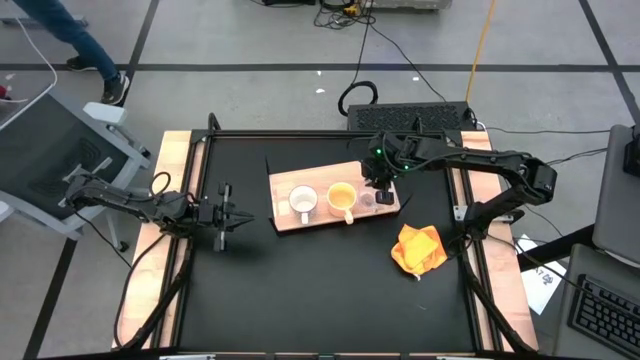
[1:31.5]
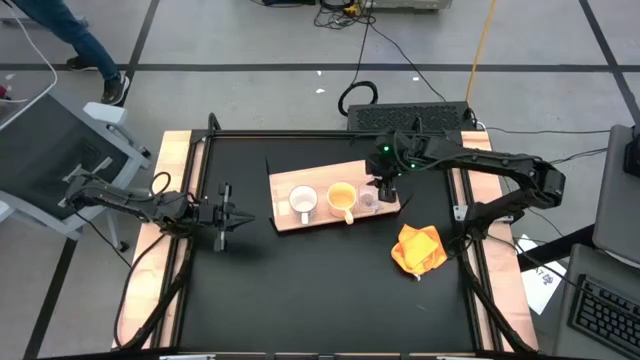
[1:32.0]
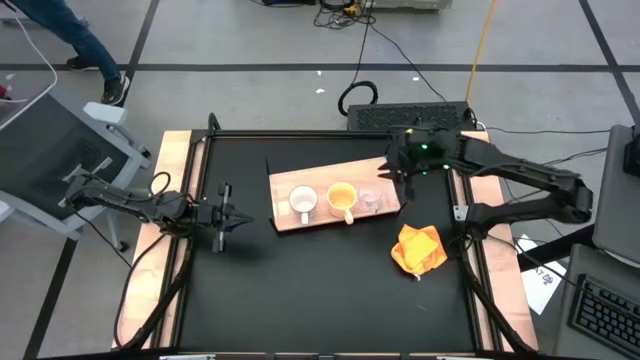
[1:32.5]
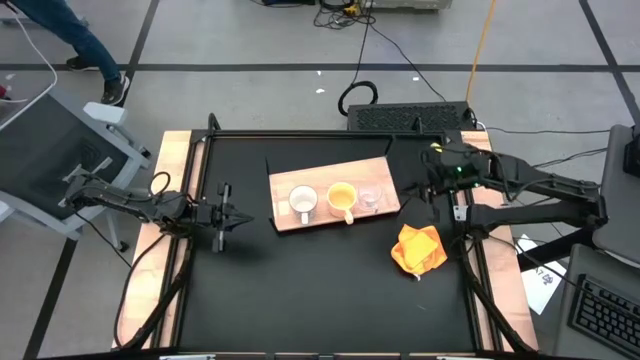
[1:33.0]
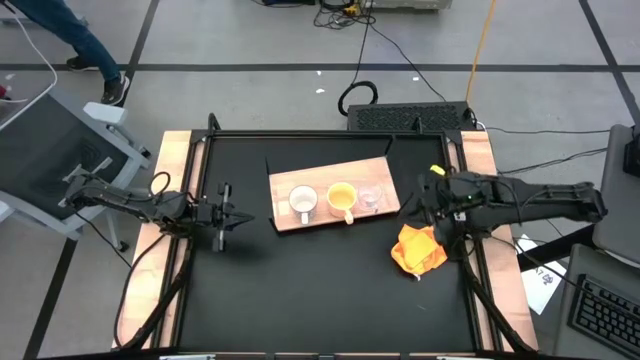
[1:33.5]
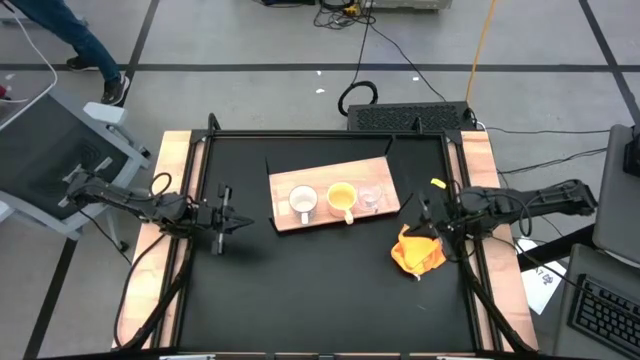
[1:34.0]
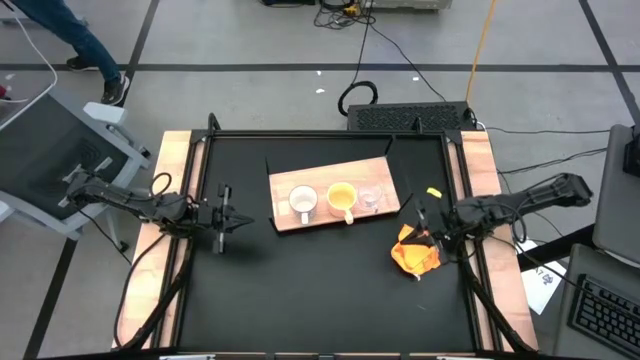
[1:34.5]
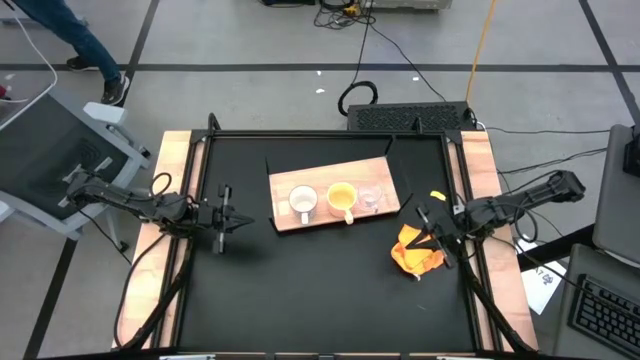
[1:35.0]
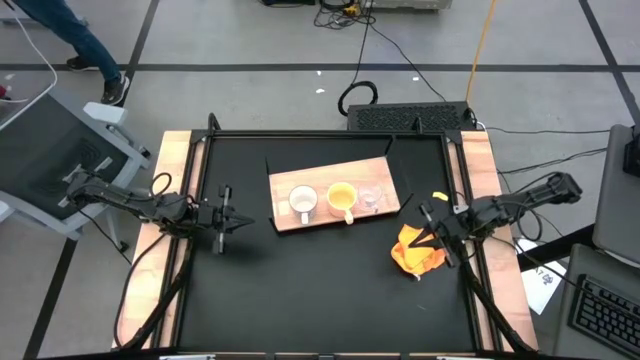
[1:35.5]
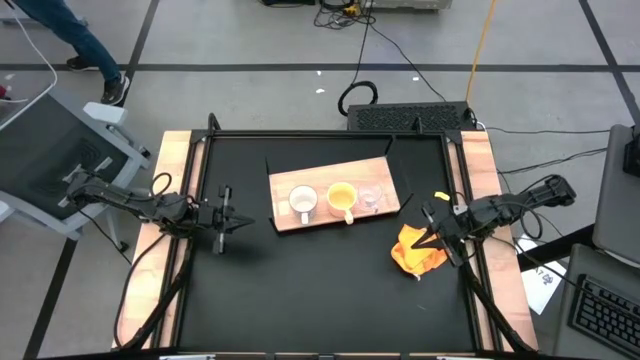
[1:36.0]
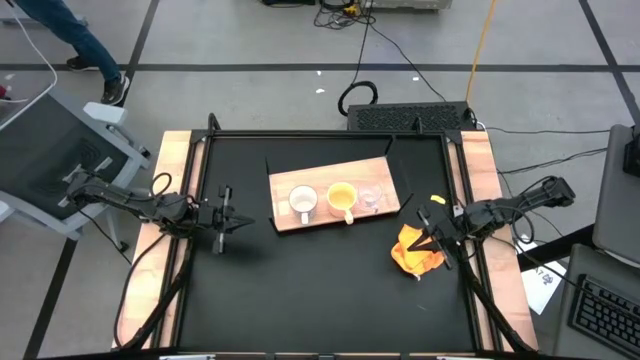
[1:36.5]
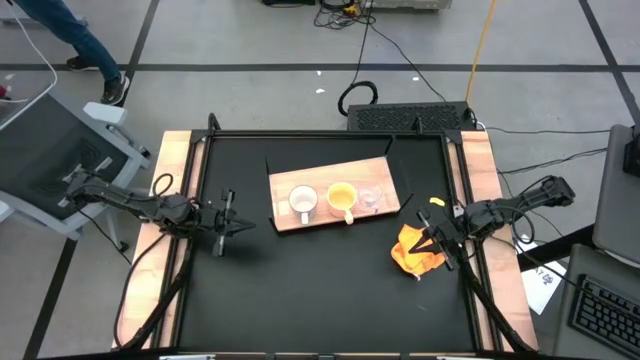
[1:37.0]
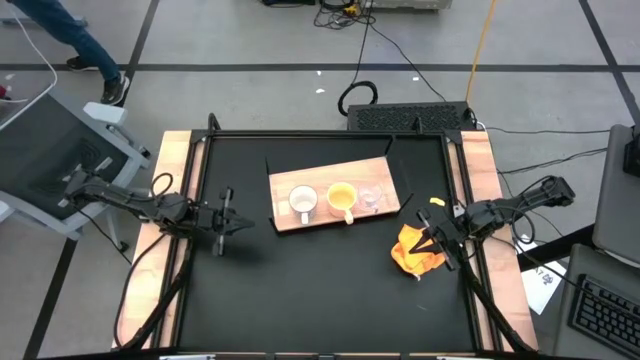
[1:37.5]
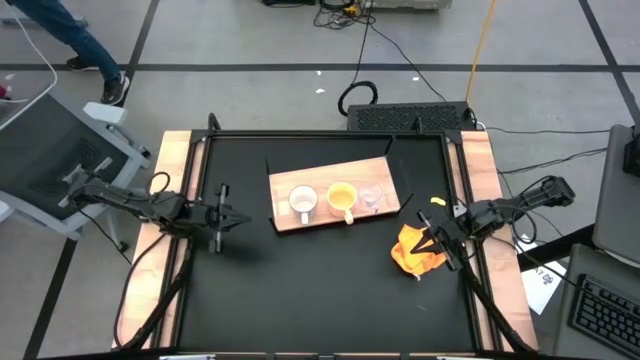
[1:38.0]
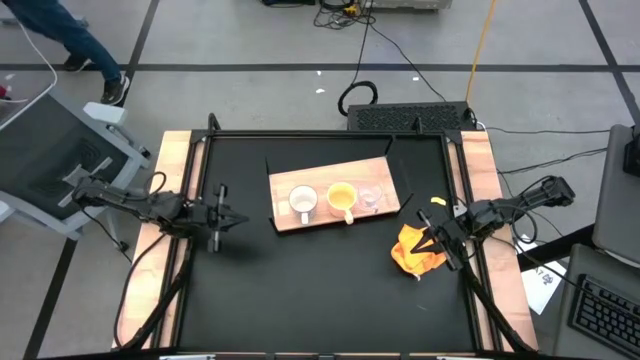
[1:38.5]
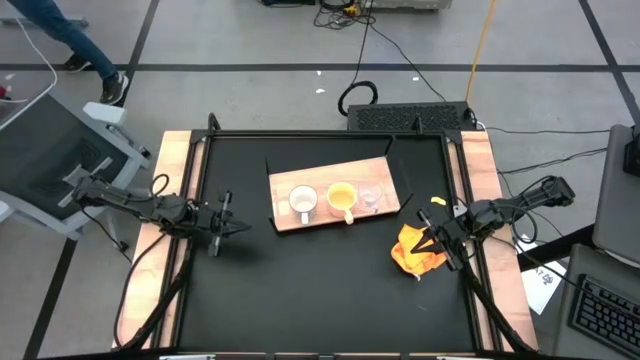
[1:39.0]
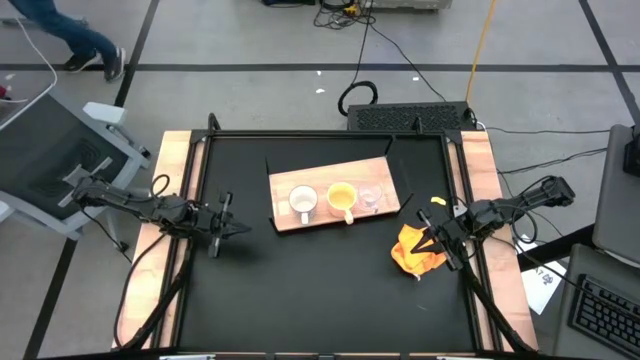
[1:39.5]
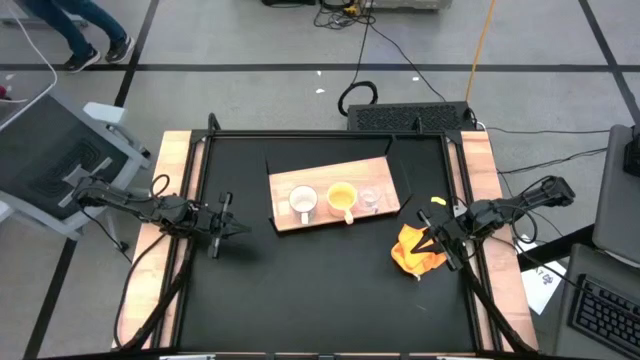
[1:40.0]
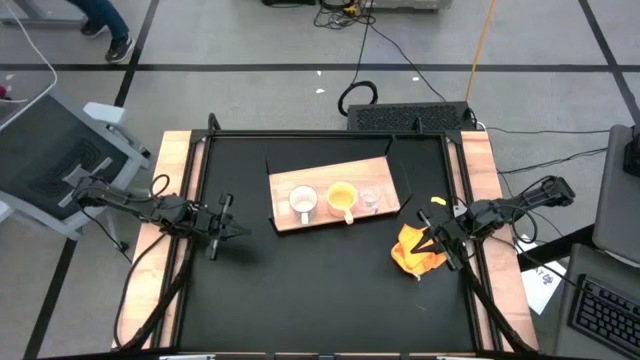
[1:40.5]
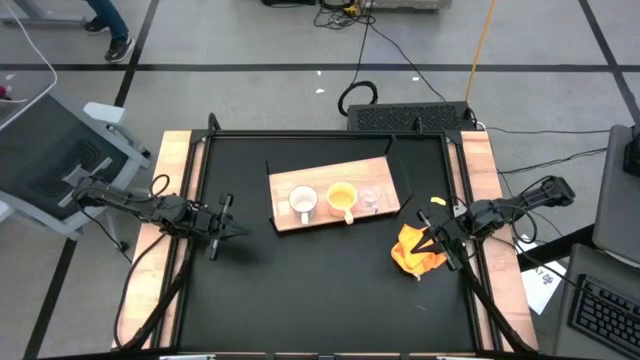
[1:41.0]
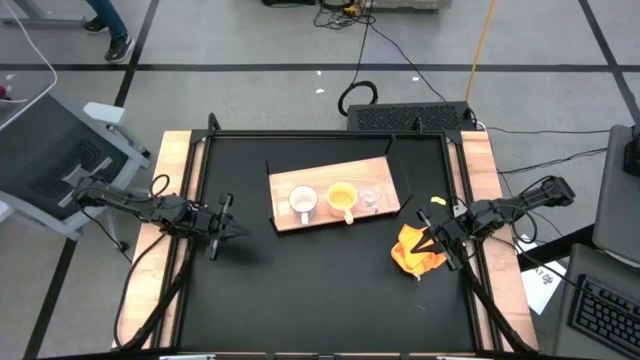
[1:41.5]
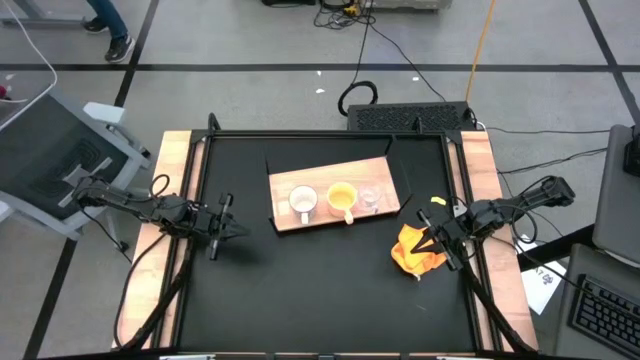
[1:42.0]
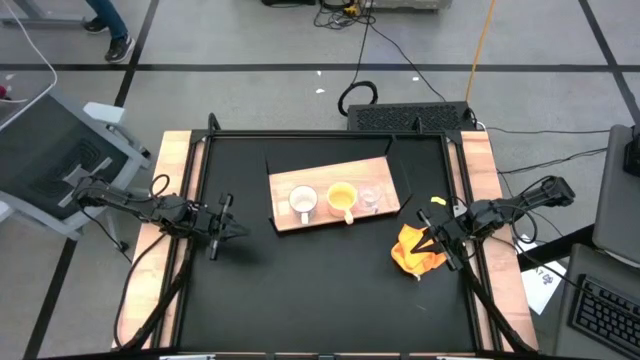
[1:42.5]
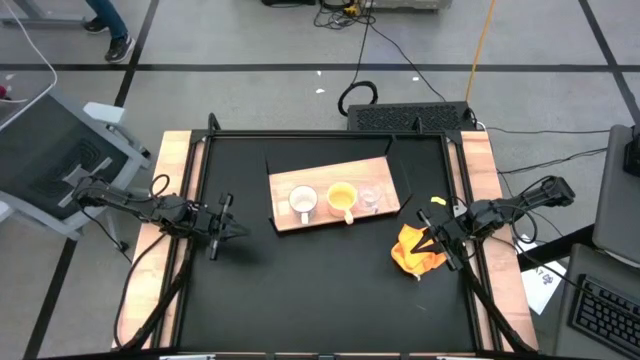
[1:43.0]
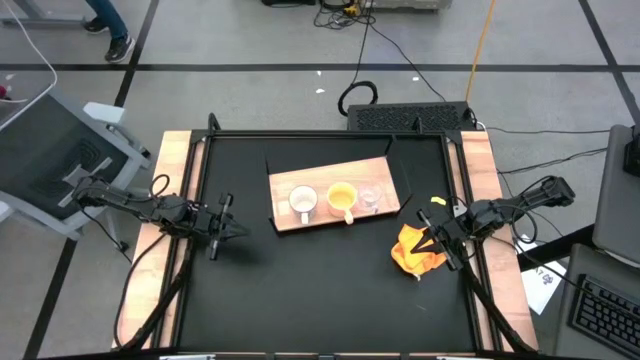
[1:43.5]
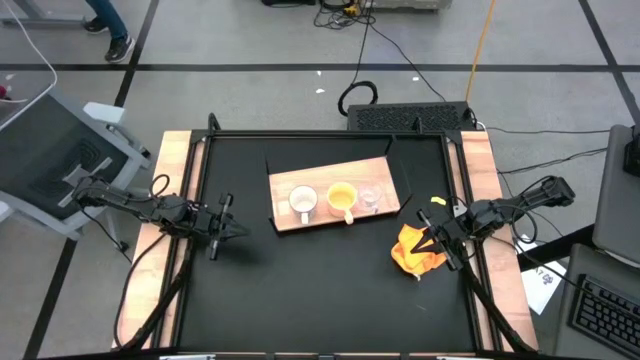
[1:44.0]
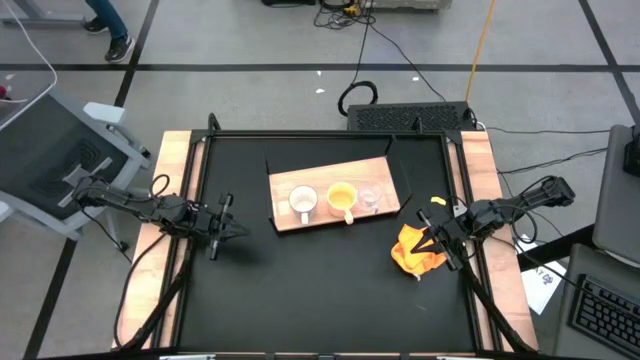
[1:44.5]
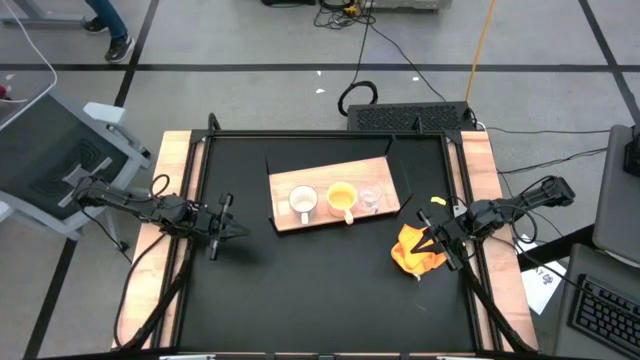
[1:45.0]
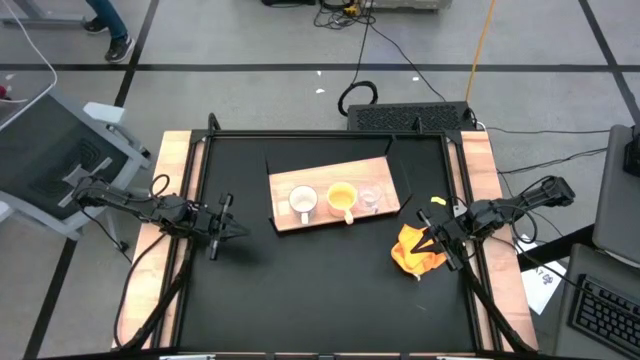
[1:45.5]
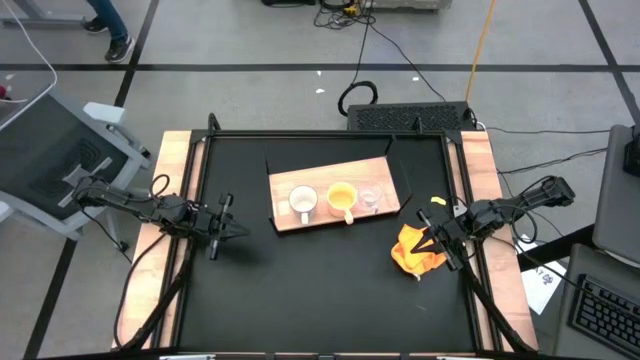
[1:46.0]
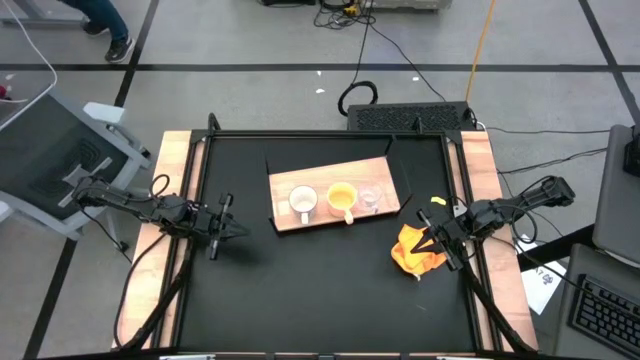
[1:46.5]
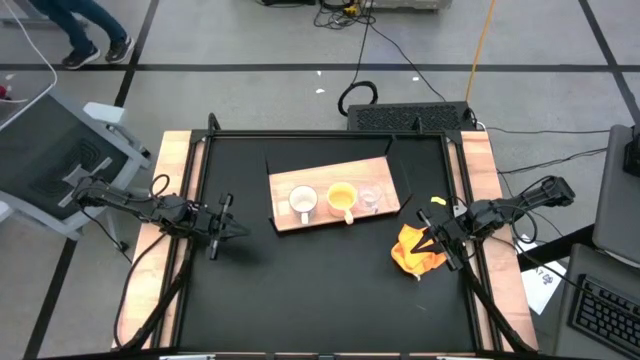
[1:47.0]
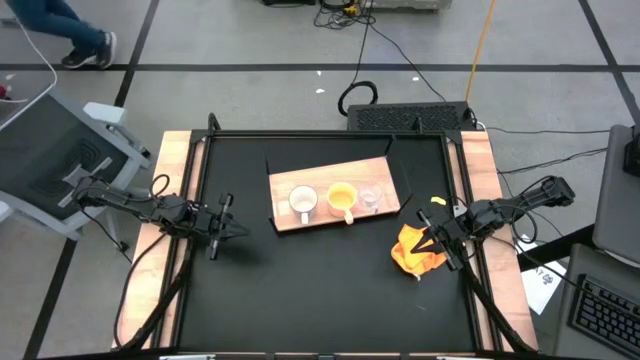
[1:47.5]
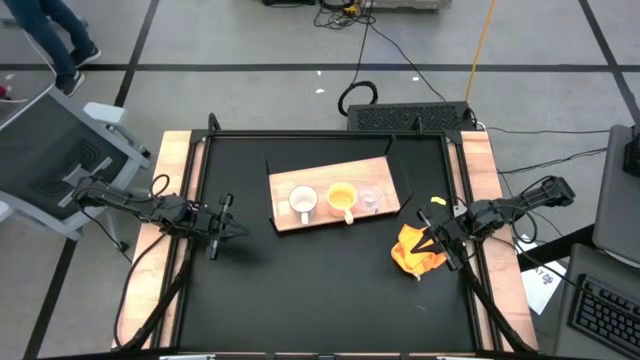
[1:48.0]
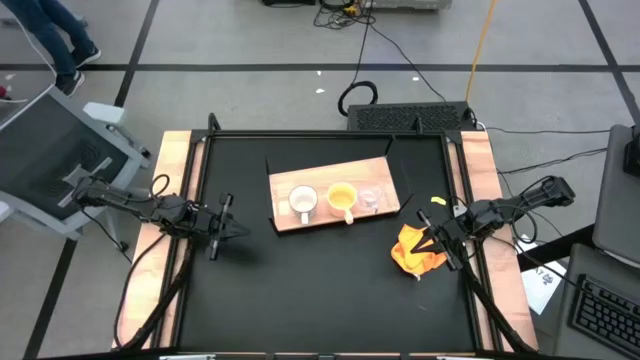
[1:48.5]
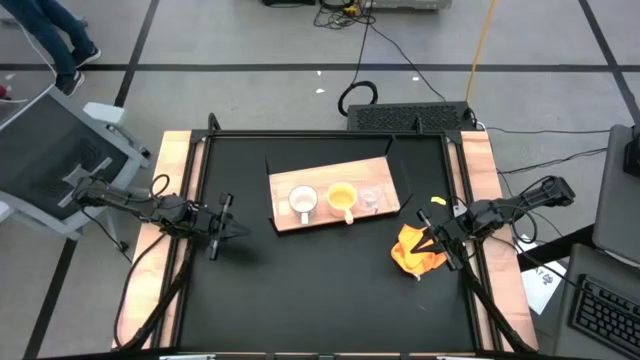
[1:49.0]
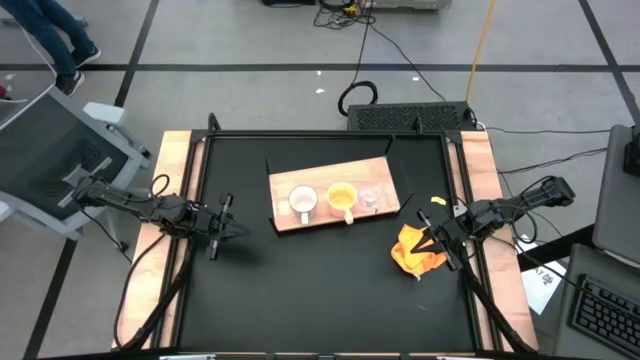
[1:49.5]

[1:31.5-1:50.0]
Task: Stack small to large cups/mugs on shelf
Return to Home Position

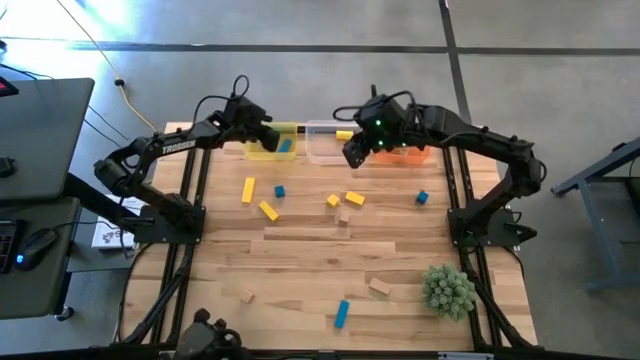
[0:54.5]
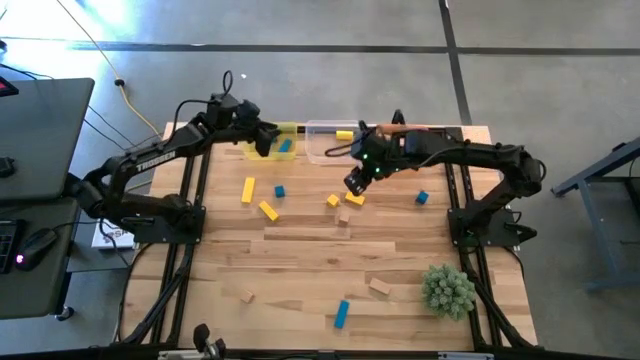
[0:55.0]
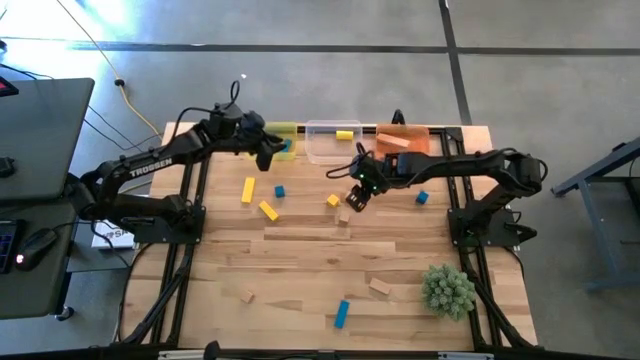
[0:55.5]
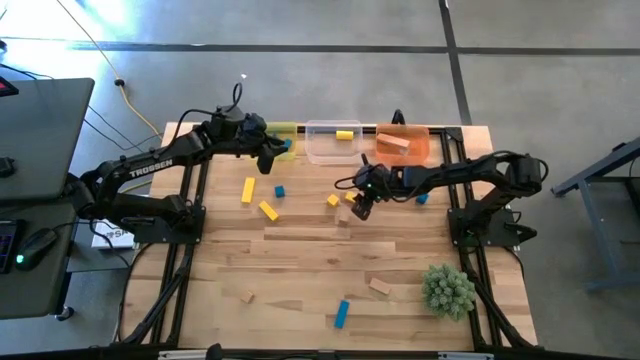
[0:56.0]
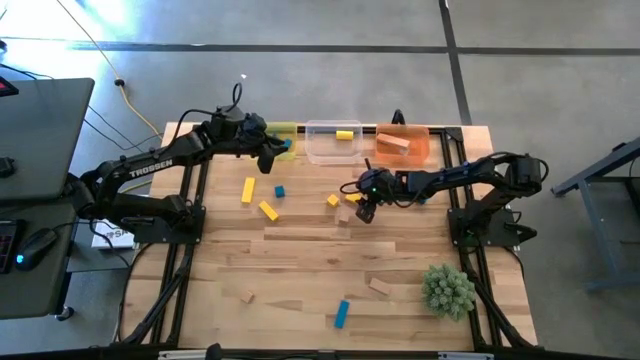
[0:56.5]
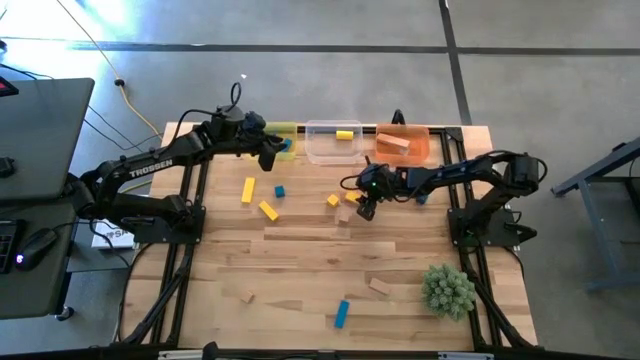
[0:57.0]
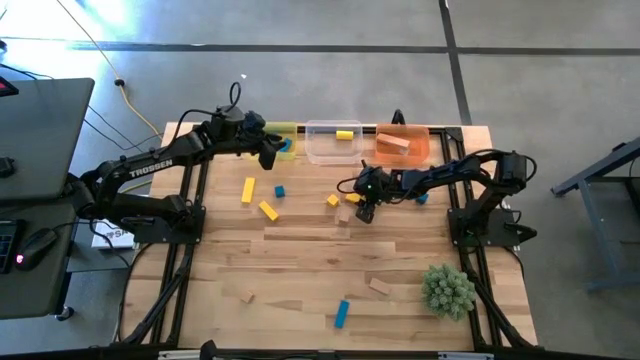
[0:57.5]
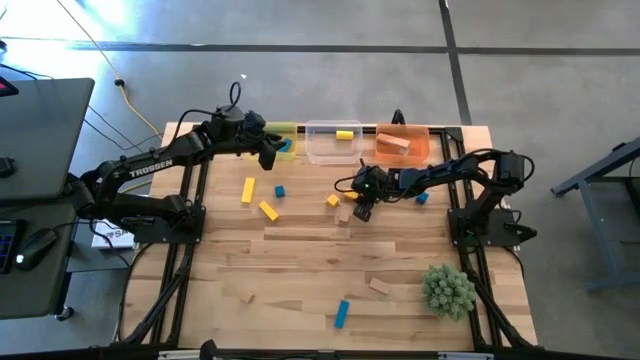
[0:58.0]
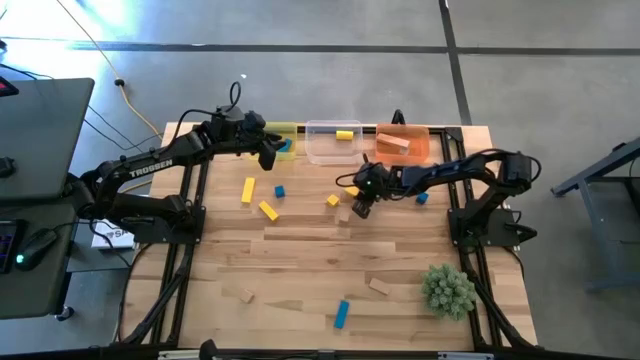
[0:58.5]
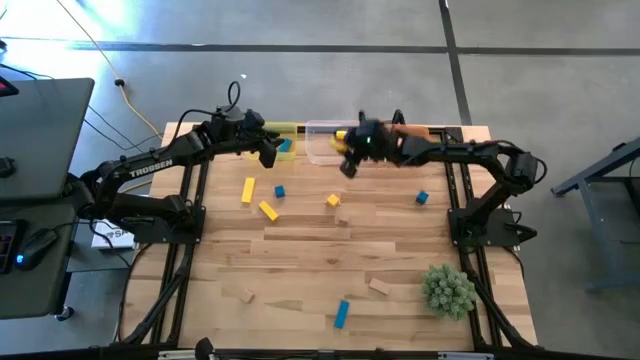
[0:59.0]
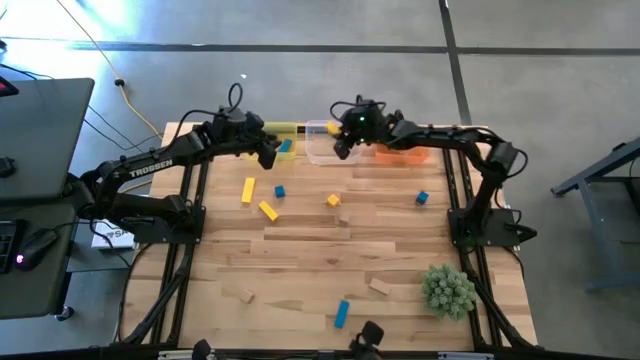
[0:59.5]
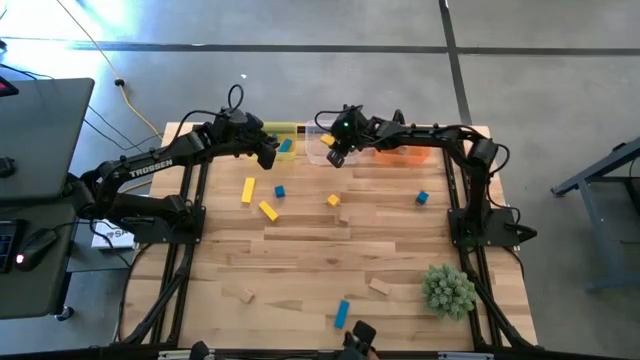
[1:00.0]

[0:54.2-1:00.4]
Task: Sort & place blocks by color
Put the yellow block into the transparent bin
